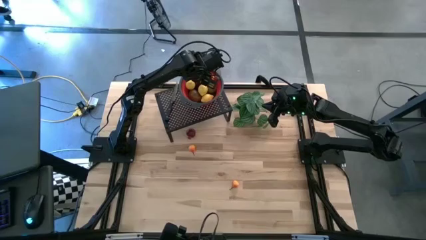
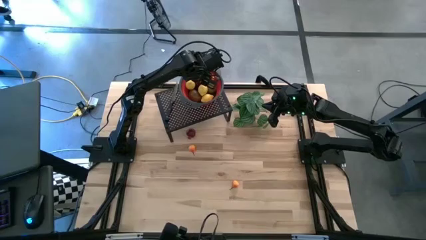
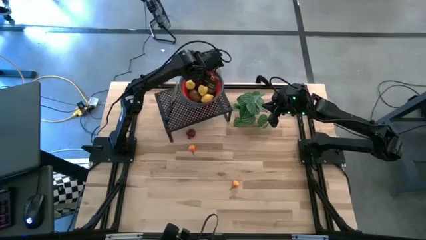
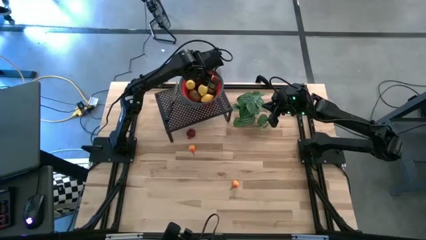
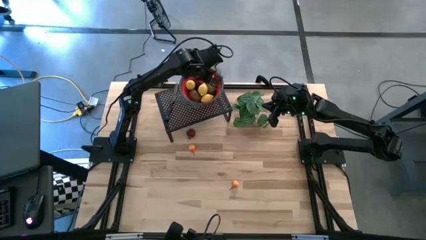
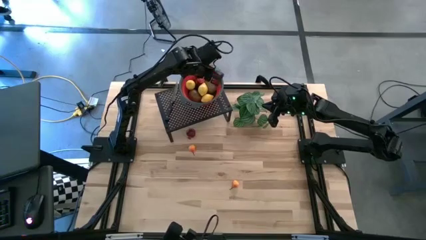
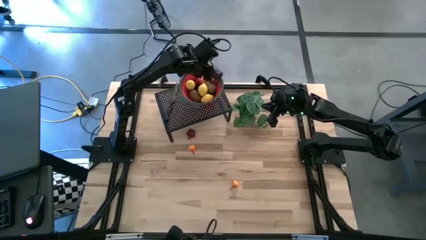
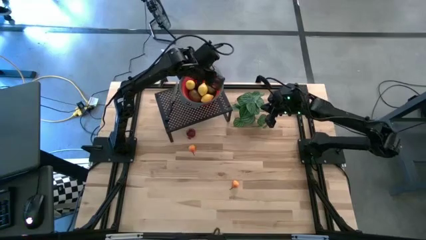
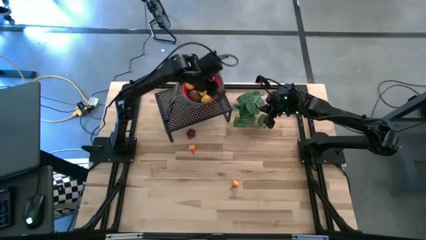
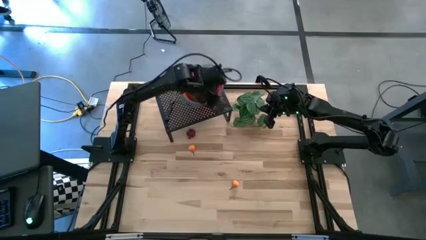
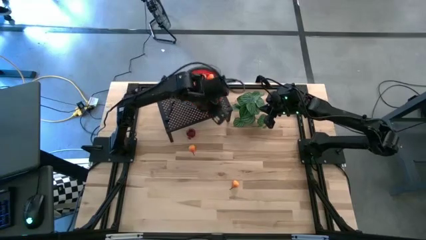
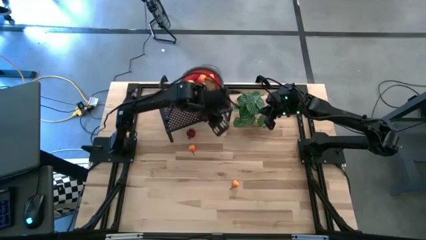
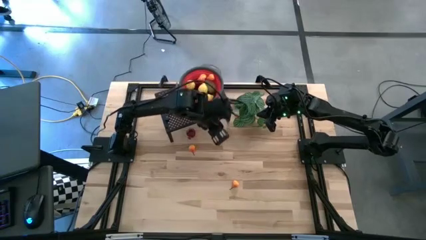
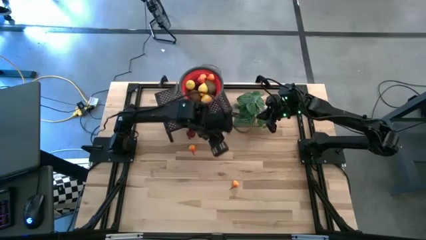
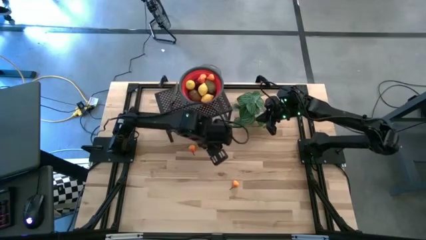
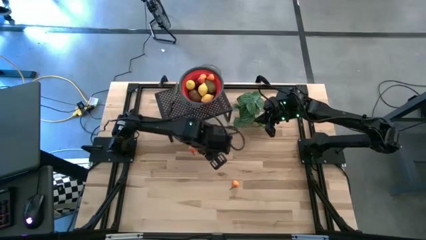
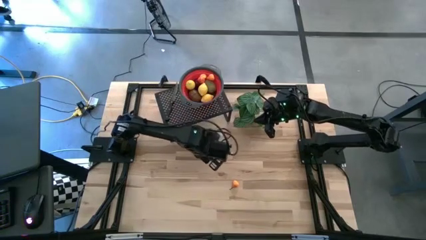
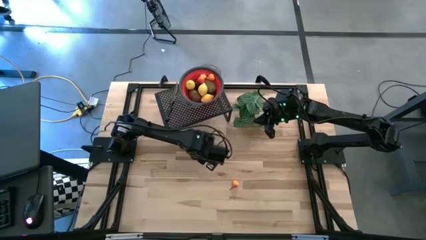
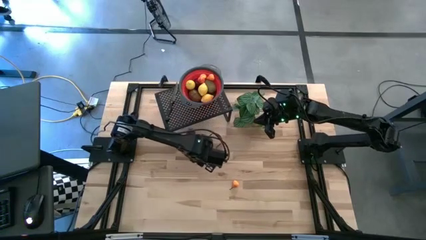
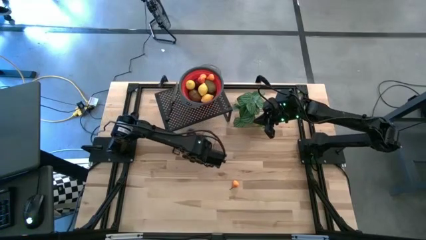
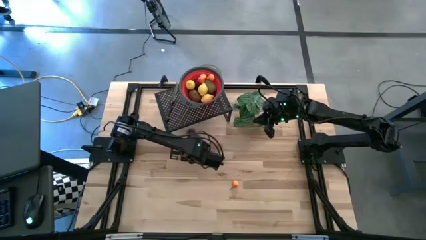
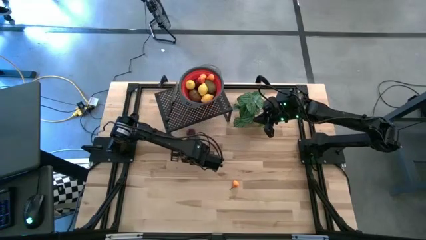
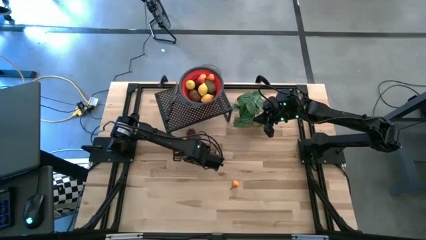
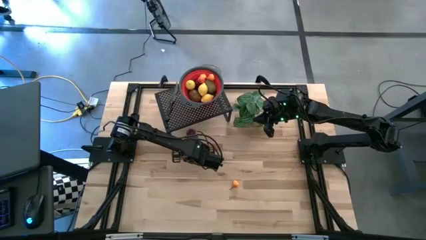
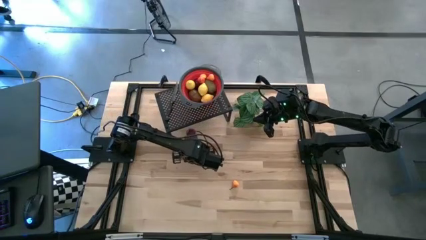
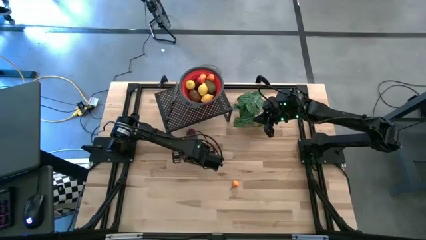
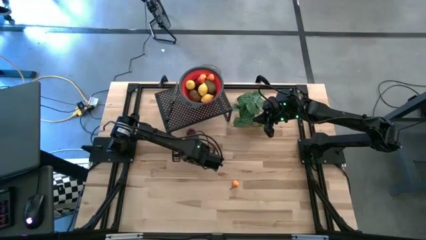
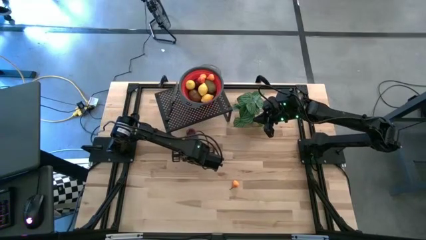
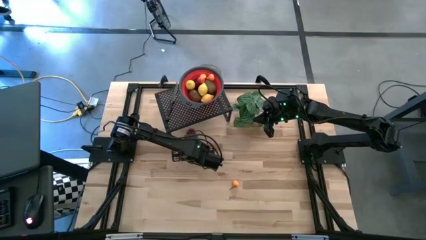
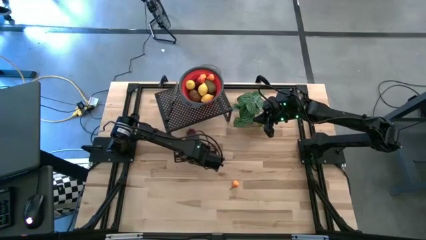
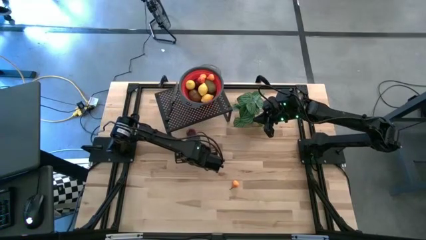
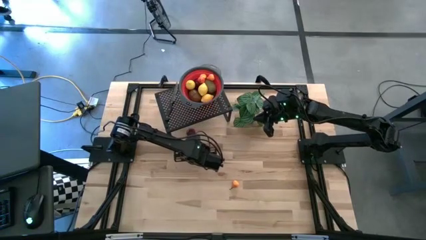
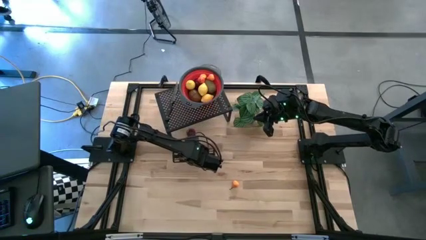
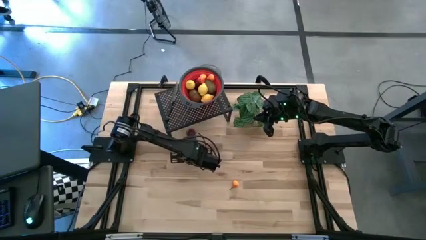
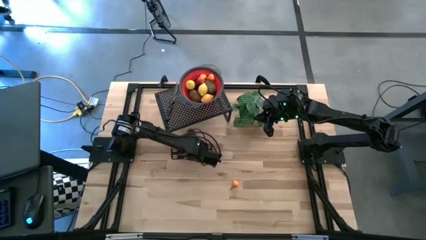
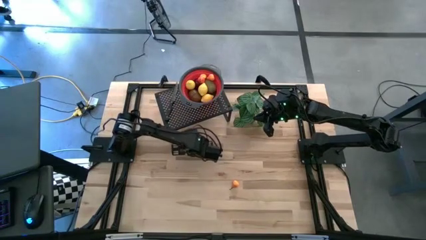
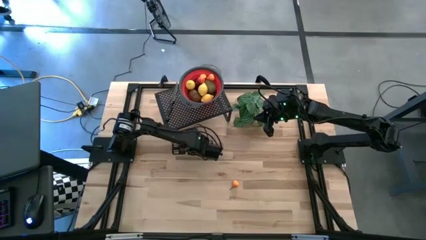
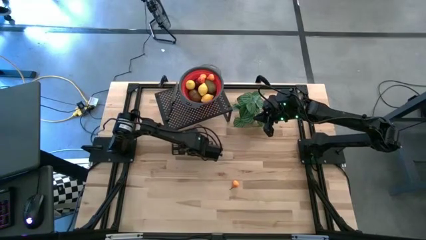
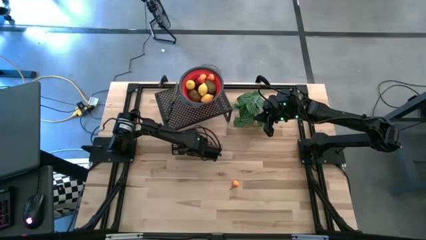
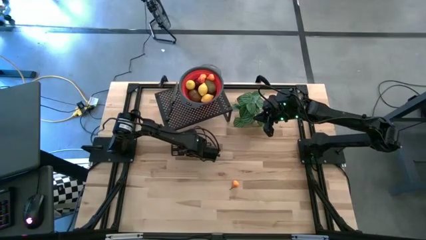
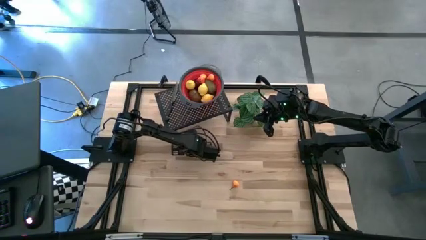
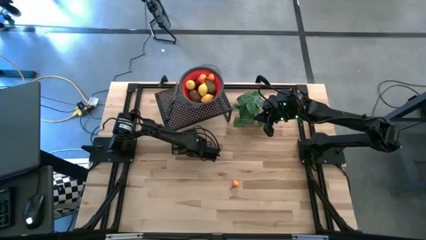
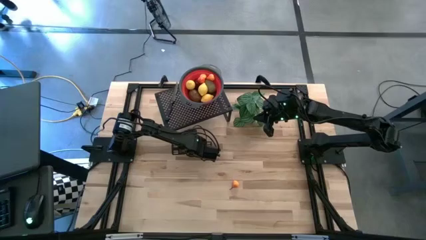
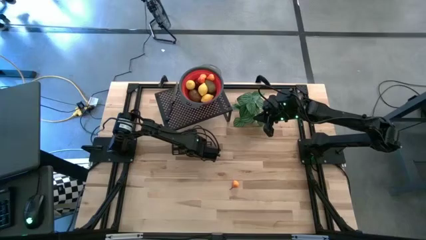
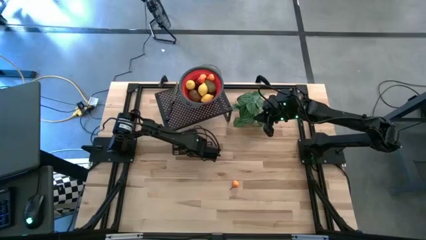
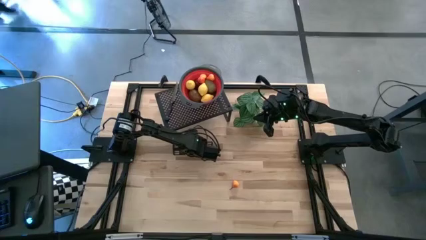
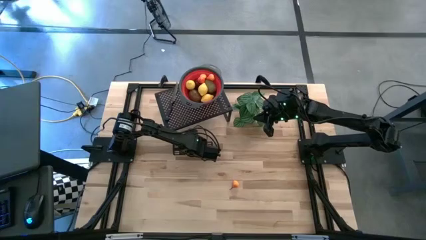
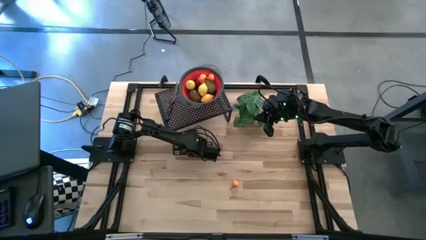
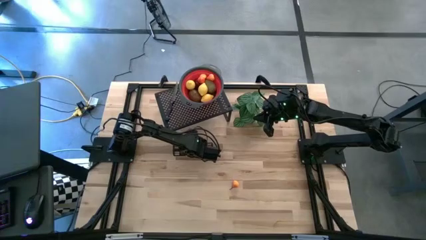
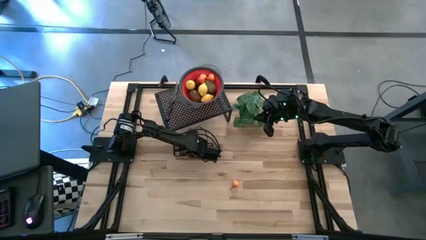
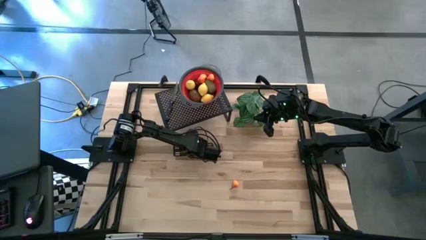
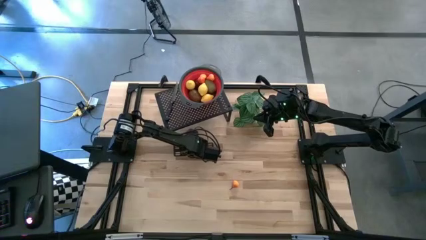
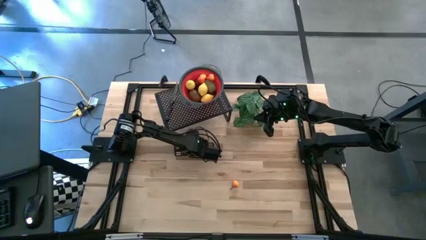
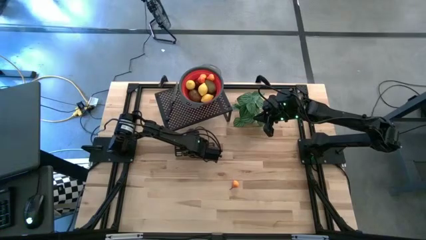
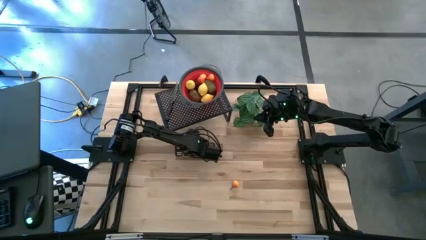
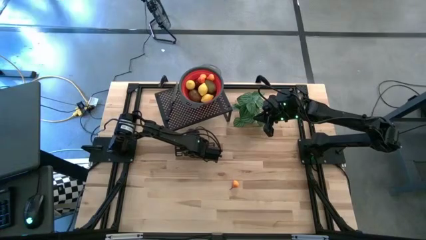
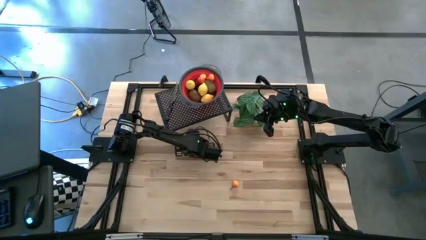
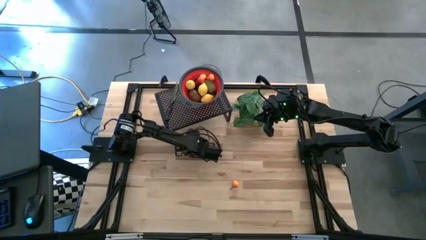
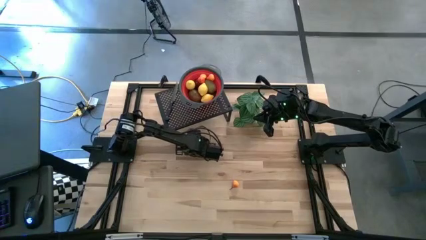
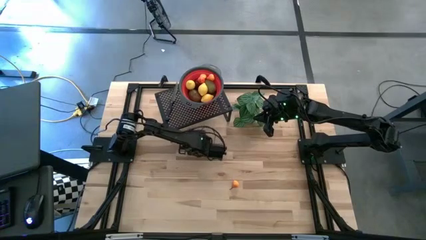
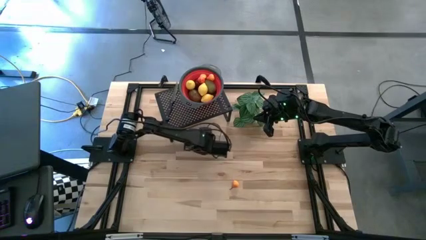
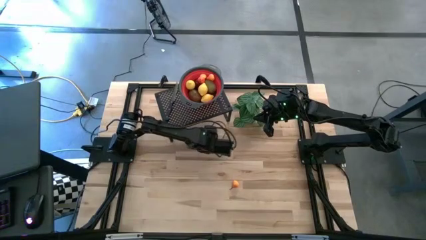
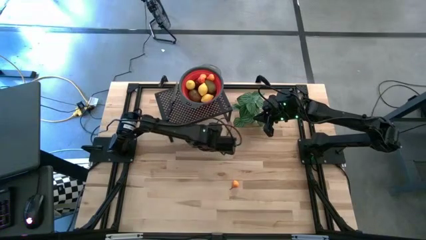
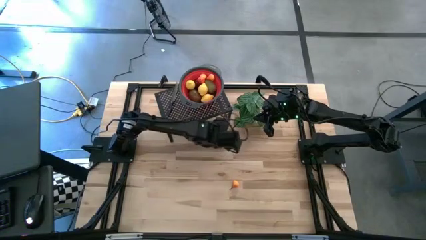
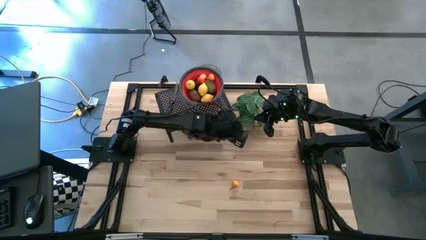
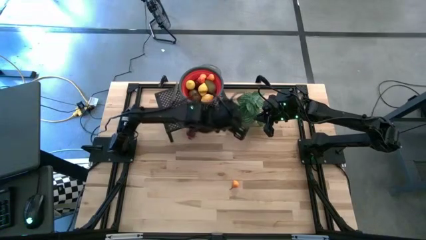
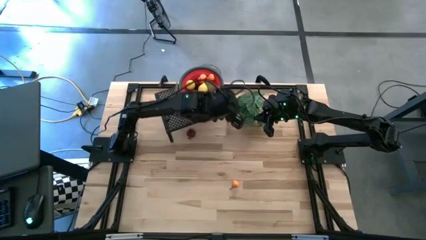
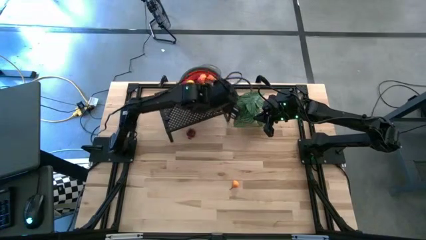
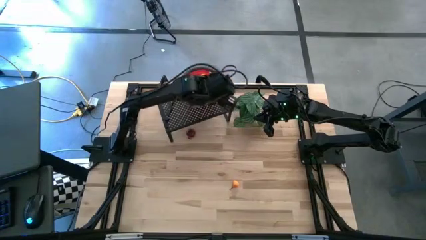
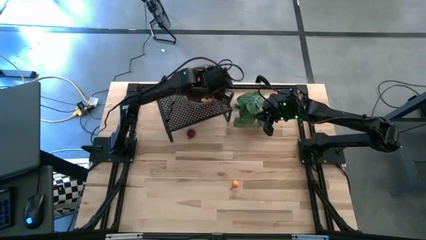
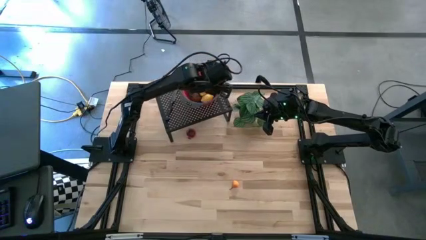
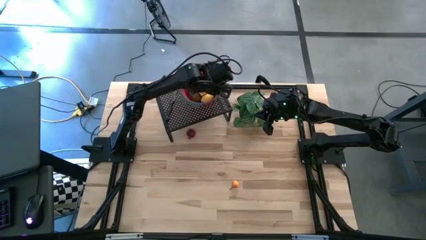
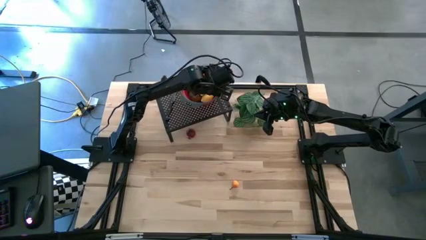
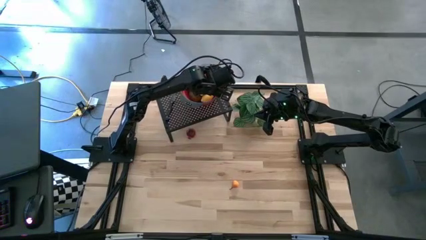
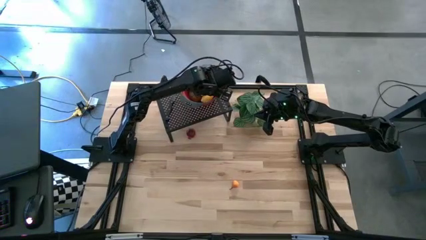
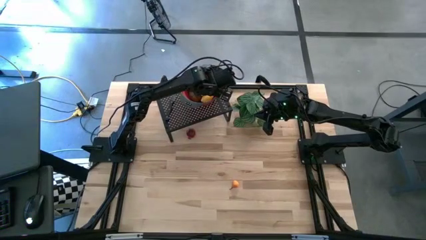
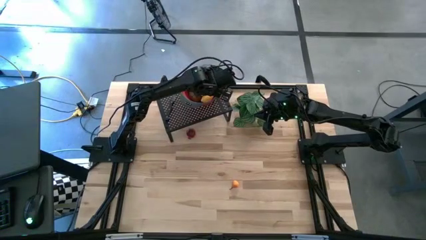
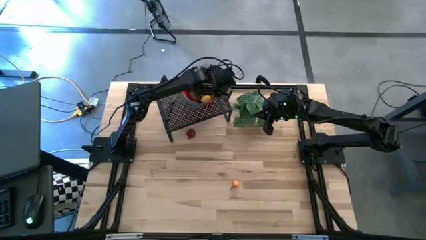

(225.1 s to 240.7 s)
Task: Pick & Place Fruit
Put the orange pear into the red basket on the shelf
